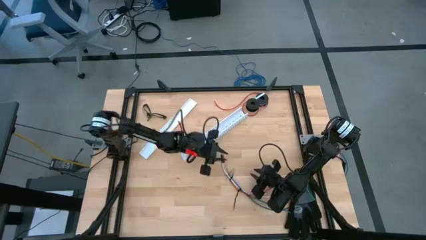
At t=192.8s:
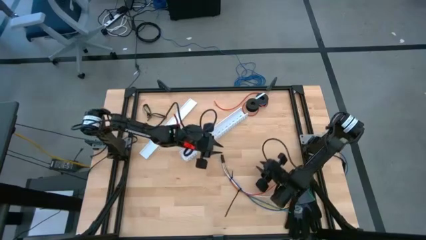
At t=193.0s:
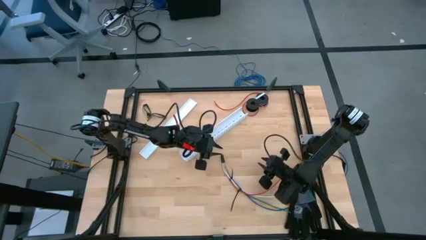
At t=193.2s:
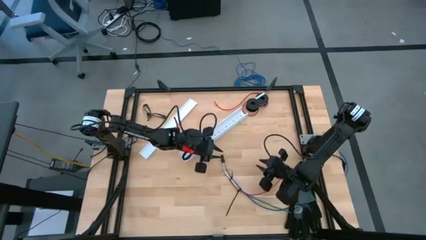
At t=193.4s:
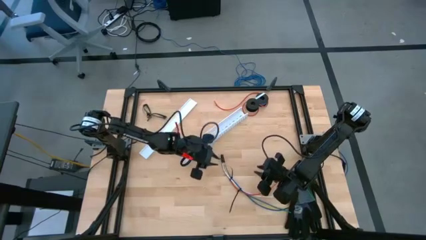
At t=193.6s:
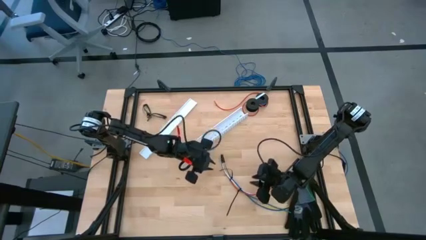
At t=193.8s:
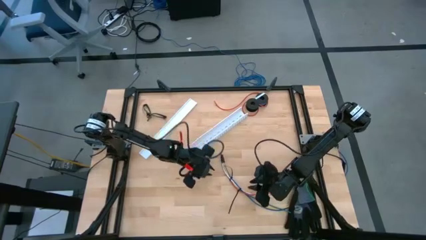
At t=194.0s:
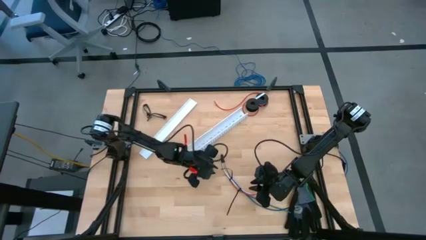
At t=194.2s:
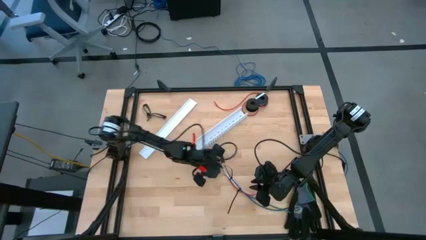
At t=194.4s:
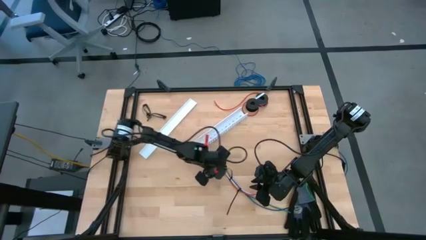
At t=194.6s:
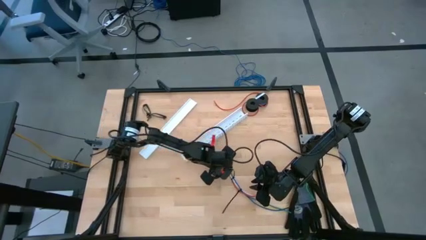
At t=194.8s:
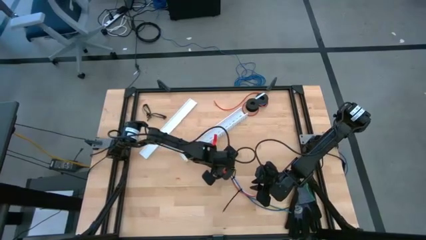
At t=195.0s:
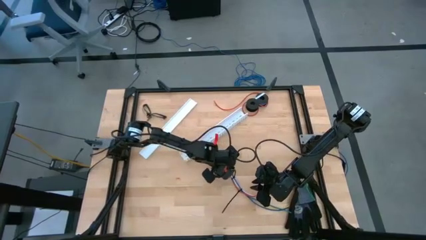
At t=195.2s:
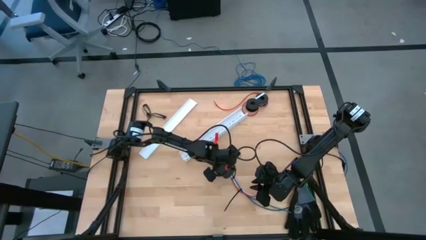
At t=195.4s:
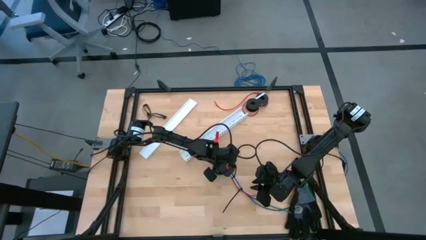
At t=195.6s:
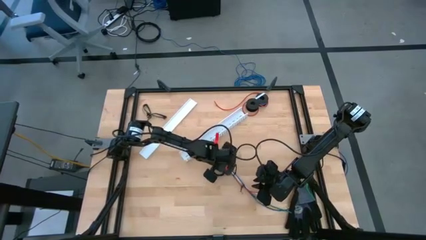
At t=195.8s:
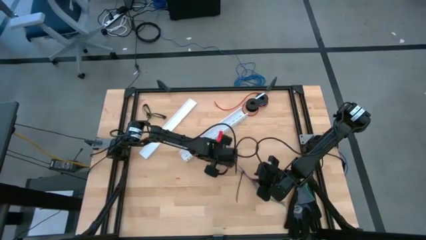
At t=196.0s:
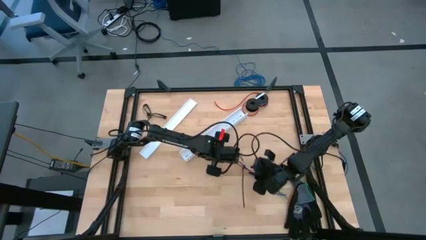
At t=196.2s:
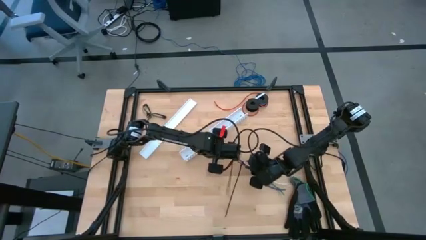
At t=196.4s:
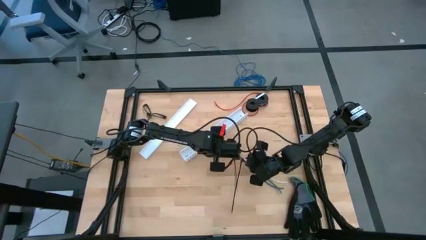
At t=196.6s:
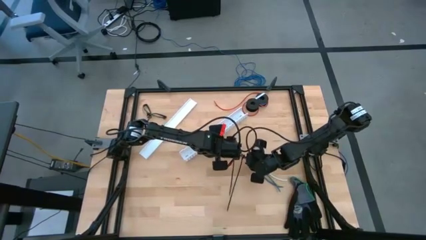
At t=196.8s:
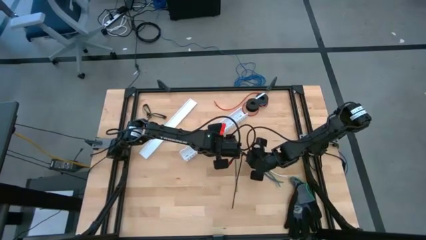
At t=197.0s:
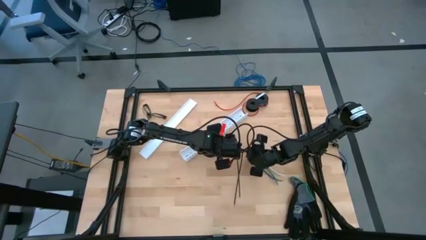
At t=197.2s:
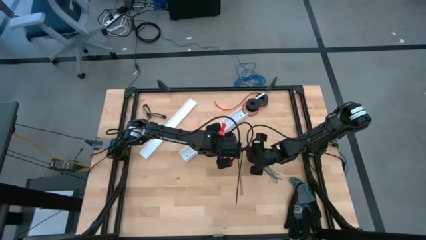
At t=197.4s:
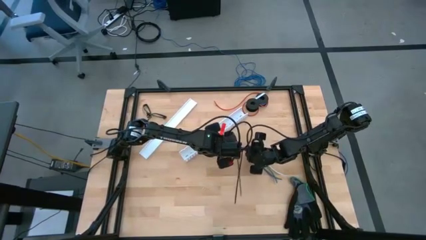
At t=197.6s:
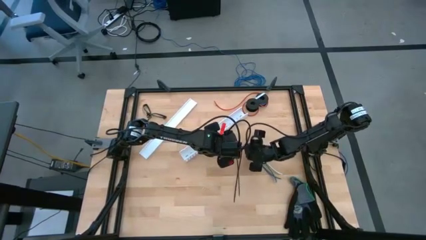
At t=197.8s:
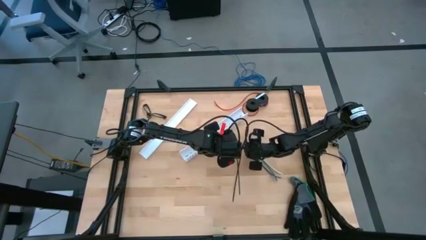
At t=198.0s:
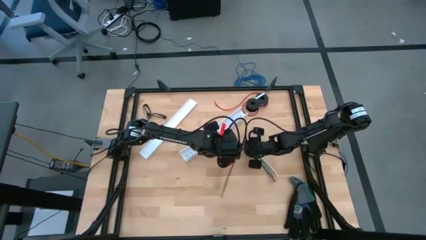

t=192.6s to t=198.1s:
Task: Ziptie cables
Put the ziptied cables into the white cable duct

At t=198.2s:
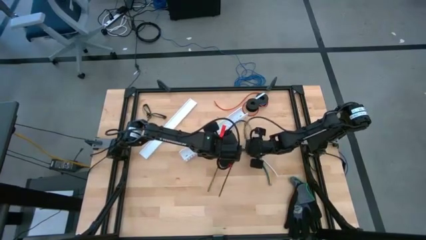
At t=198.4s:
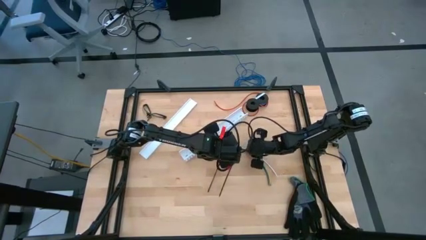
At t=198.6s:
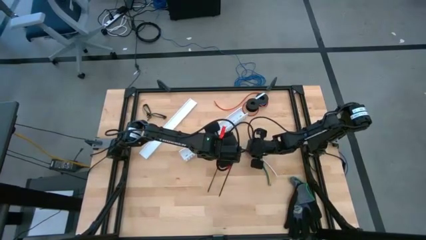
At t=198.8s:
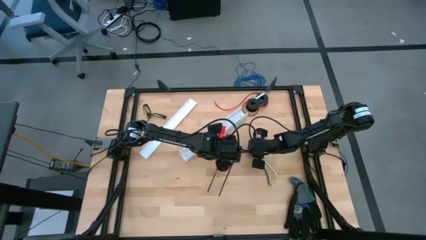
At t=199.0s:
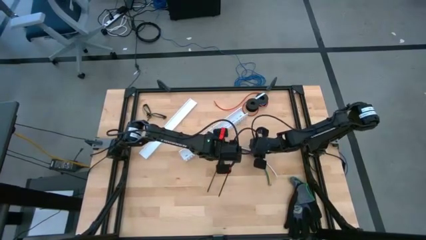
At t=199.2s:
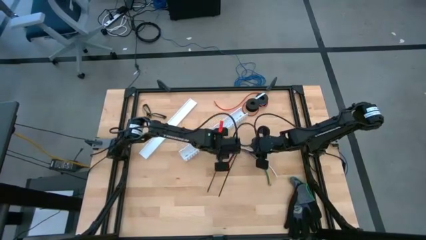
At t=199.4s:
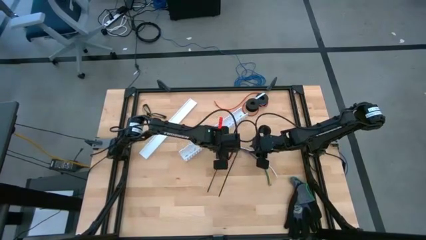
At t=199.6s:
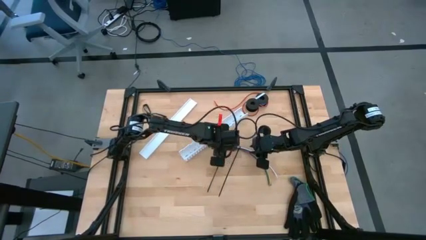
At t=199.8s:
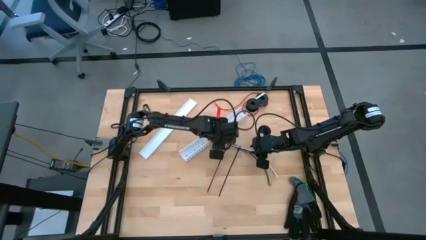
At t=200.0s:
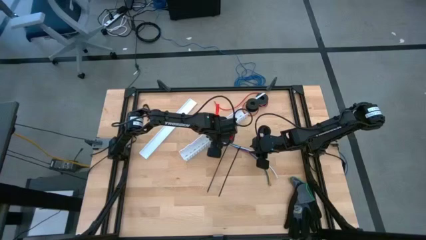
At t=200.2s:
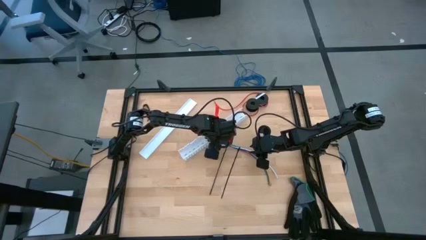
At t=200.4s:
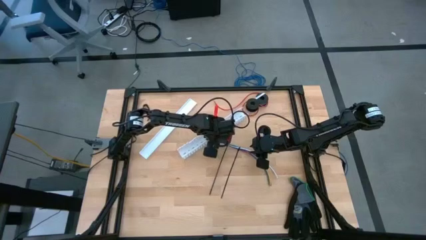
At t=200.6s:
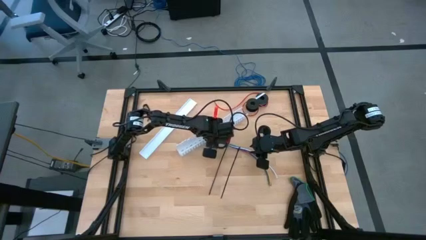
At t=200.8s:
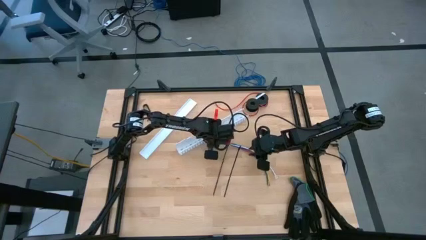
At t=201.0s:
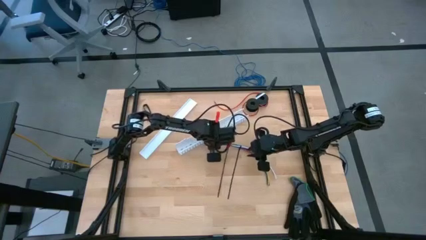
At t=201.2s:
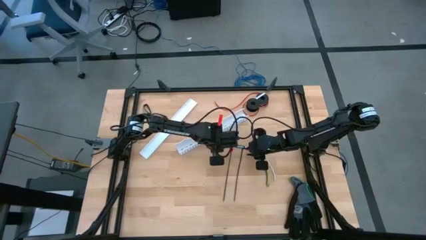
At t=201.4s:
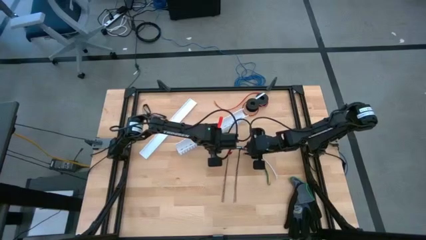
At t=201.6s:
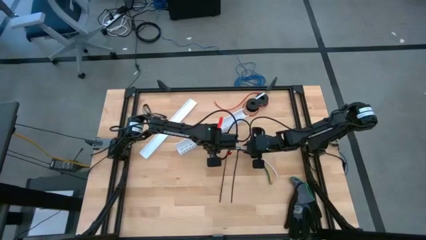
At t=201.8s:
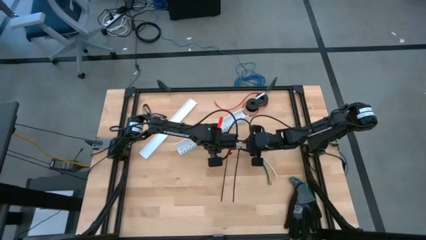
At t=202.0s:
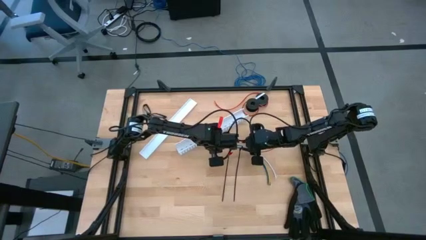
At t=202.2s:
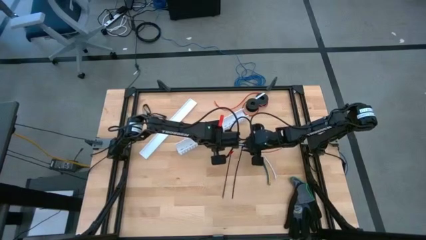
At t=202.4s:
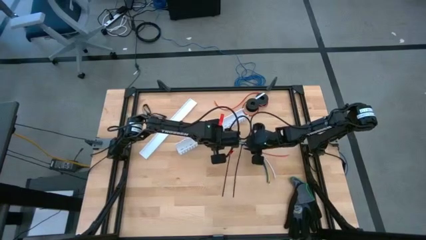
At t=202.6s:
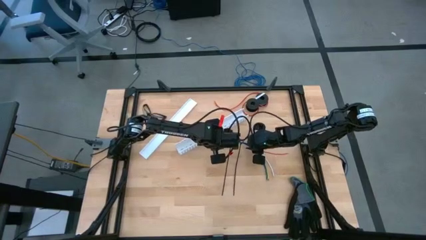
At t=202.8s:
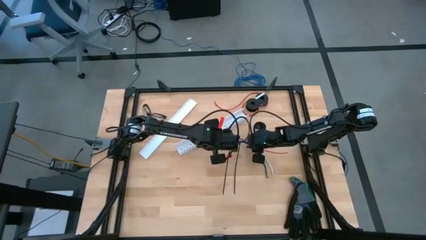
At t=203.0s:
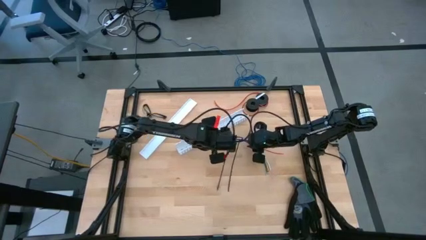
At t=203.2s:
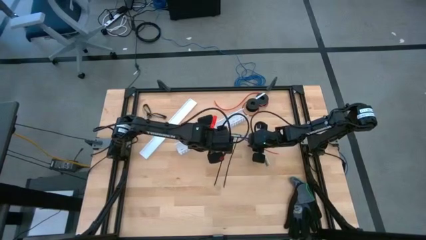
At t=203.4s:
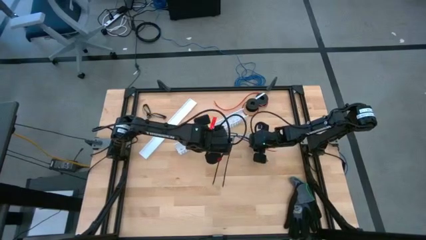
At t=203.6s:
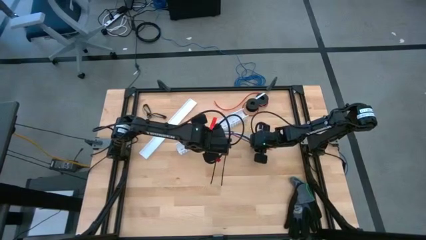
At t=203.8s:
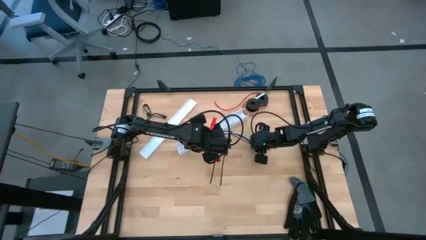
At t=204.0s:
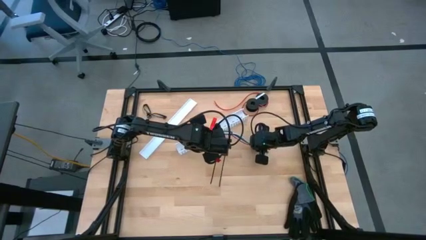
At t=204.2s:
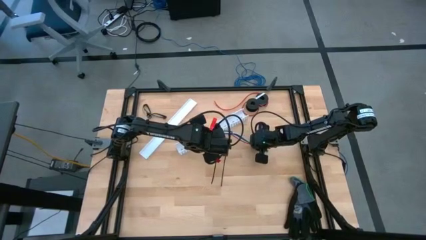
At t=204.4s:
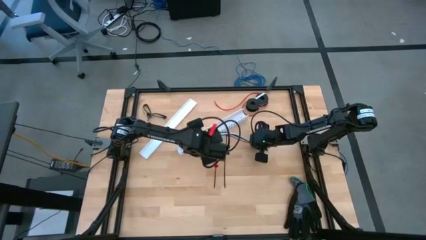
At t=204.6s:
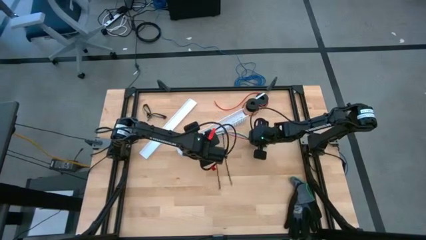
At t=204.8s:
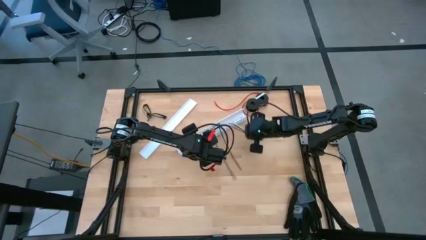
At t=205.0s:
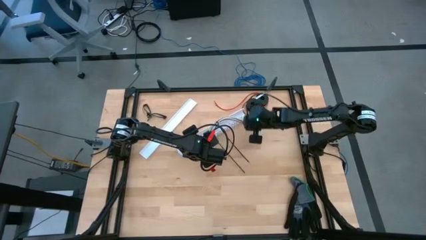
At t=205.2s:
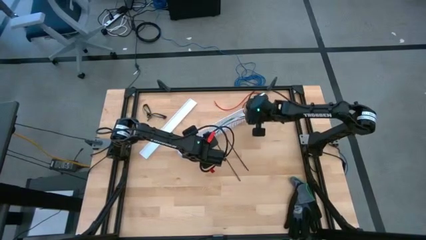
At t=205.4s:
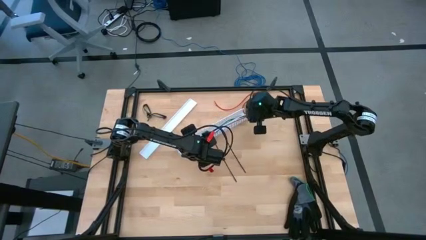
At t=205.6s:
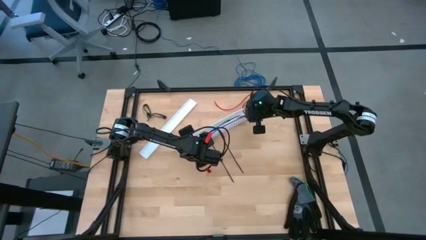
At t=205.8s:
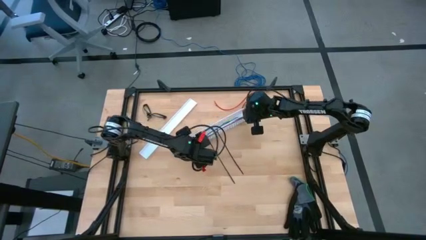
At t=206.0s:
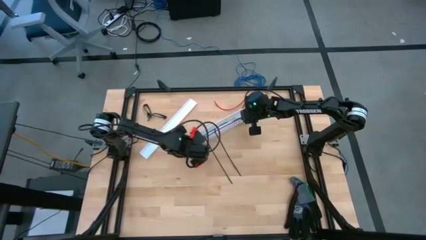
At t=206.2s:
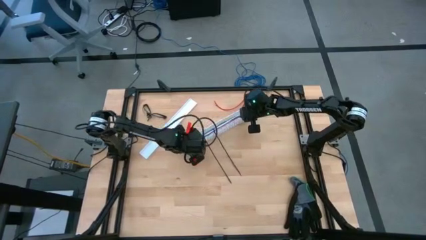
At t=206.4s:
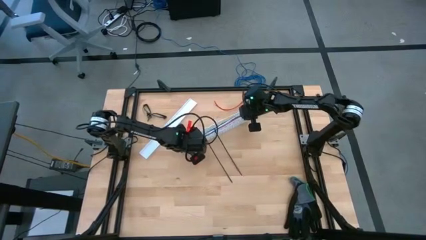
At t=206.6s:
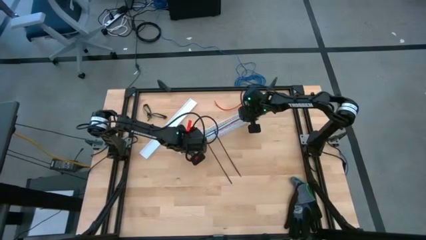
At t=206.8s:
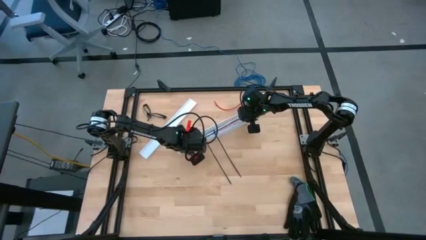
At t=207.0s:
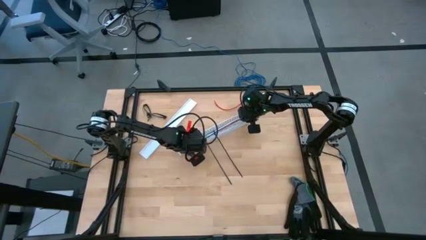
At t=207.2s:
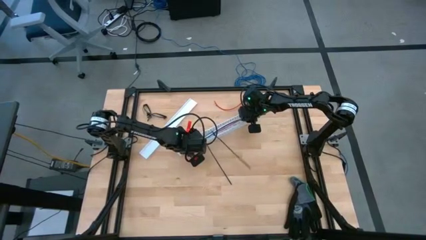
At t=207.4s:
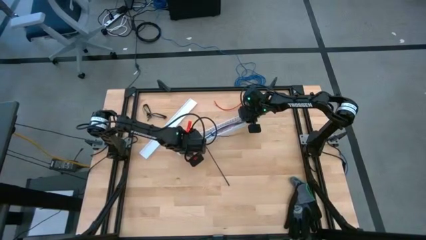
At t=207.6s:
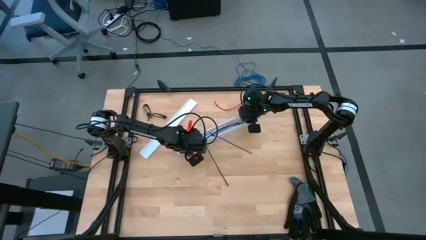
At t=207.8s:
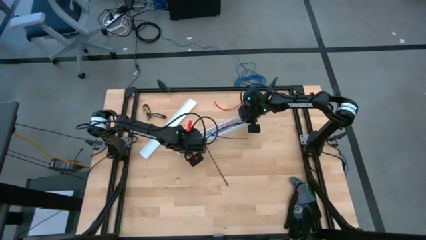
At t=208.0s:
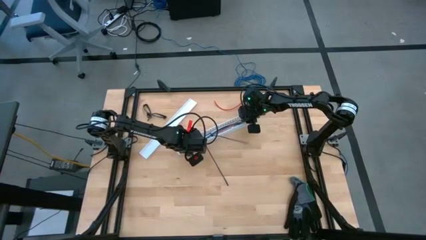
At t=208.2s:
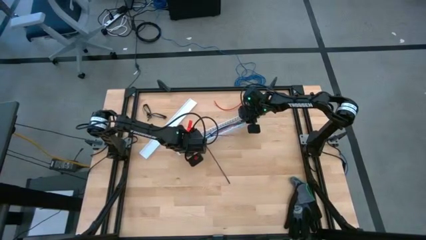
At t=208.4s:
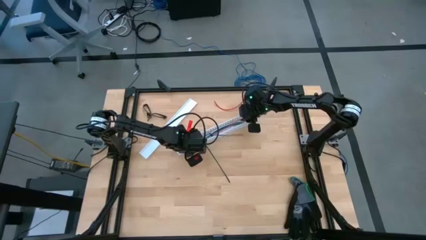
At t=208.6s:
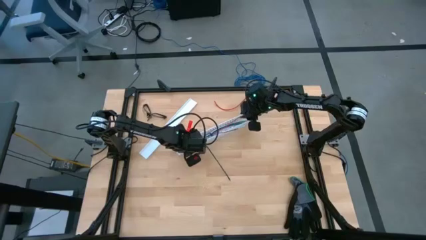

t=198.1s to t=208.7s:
Put the ziptied cables into the white cable duct
